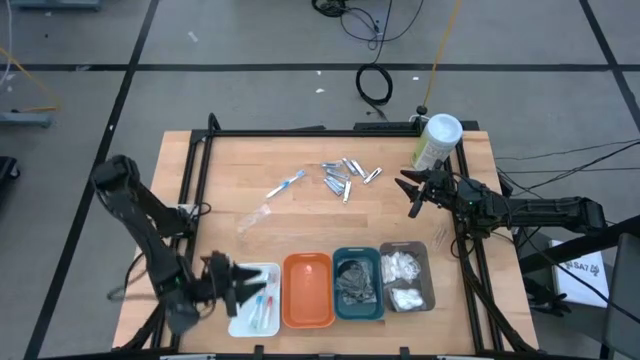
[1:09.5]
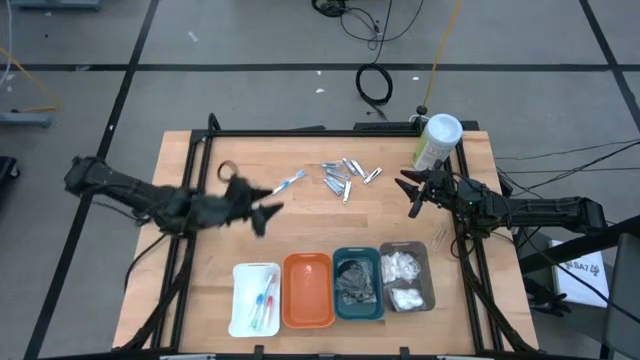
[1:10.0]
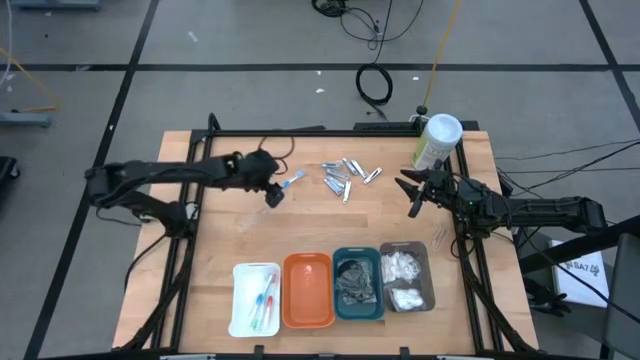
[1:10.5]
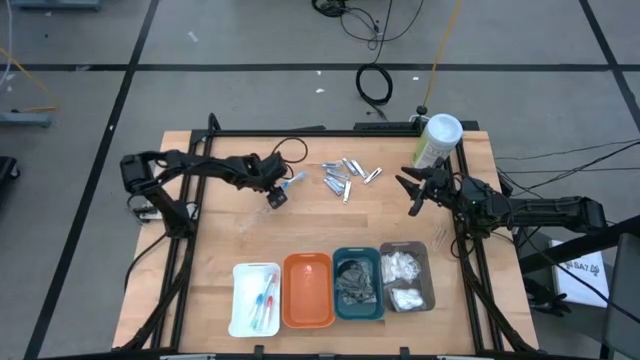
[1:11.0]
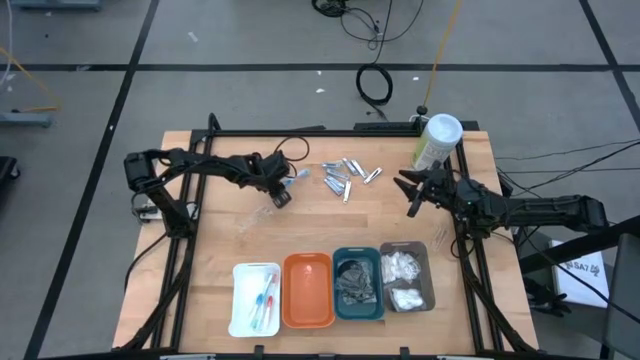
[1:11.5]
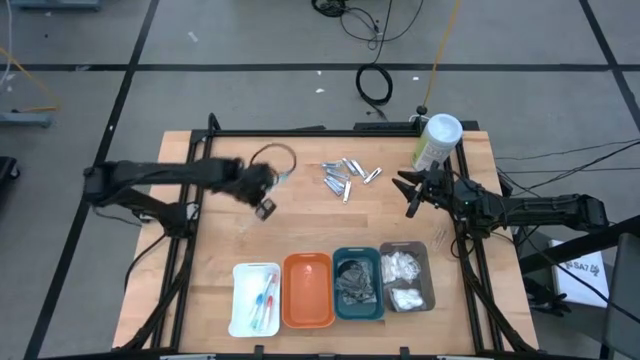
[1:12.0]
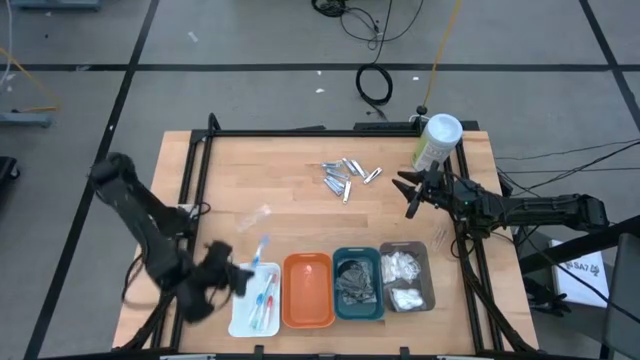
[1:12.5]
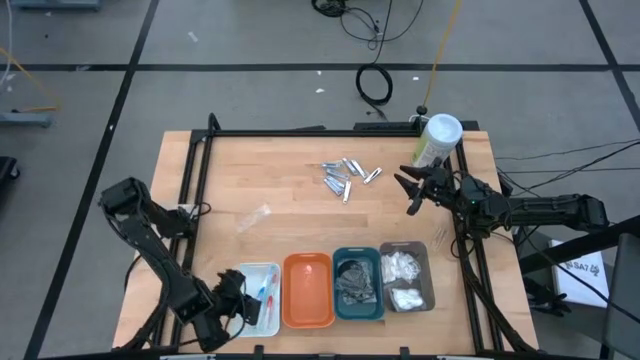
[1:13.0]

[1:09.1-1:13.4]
Task: Pick & Place Travel size toiletries
Put the blue toothbrush into the white bin

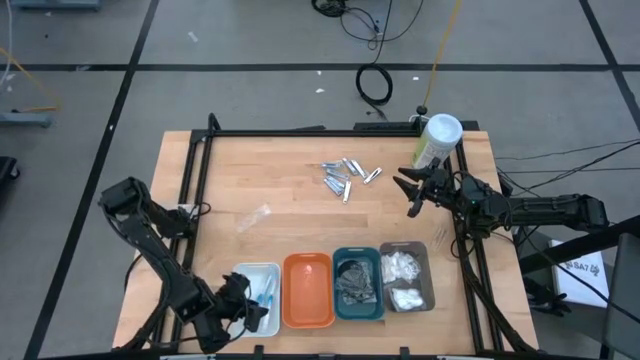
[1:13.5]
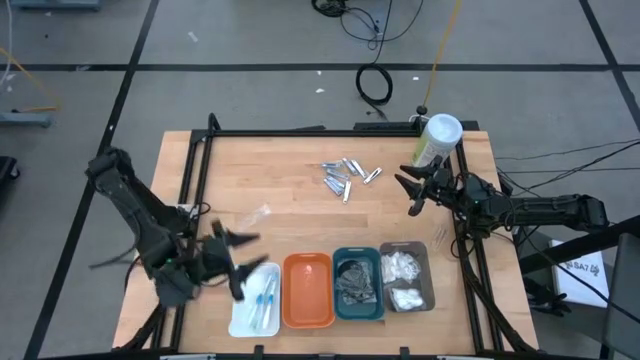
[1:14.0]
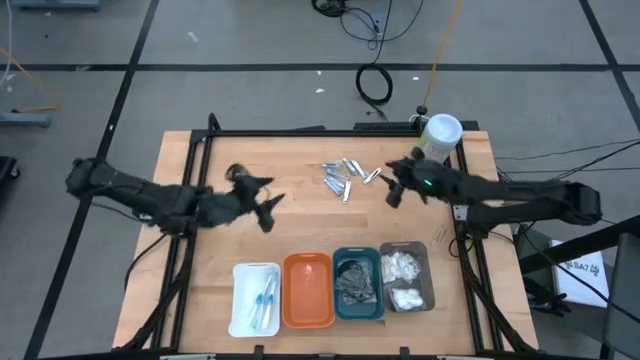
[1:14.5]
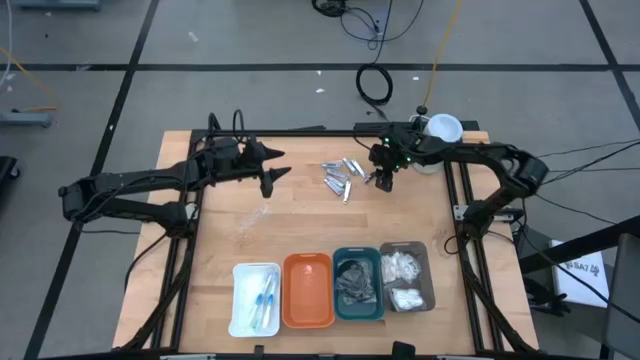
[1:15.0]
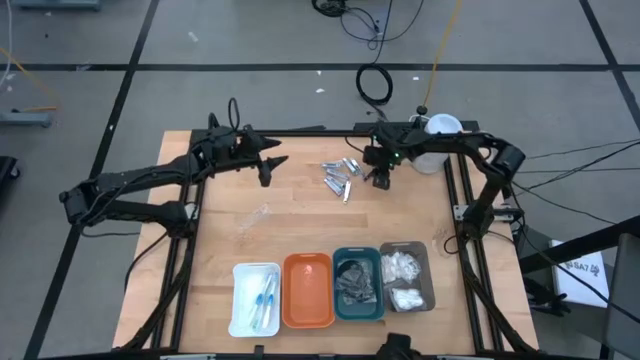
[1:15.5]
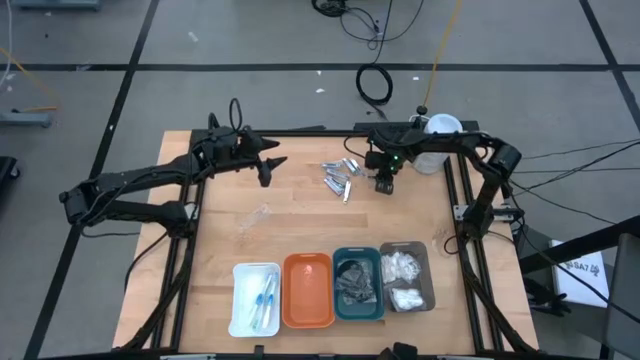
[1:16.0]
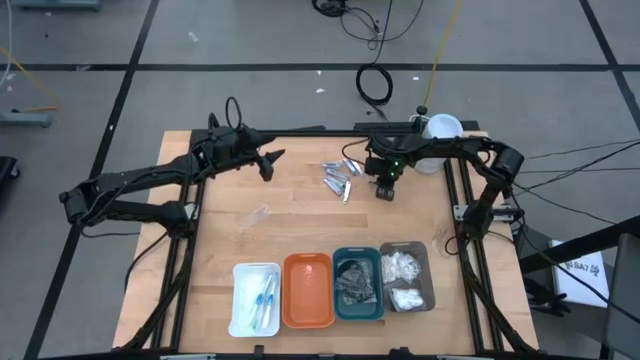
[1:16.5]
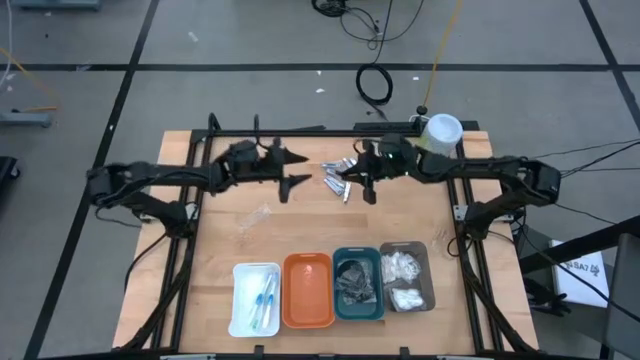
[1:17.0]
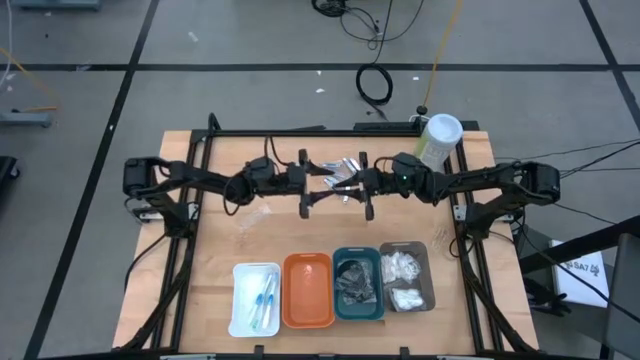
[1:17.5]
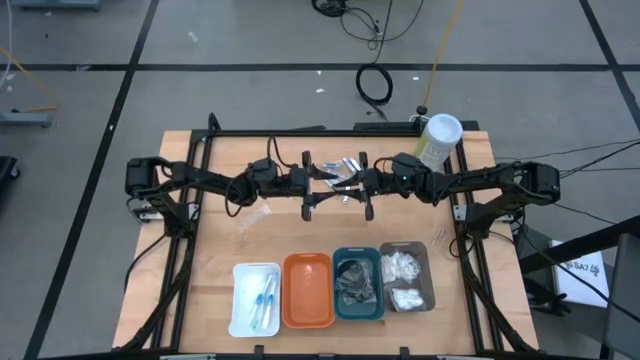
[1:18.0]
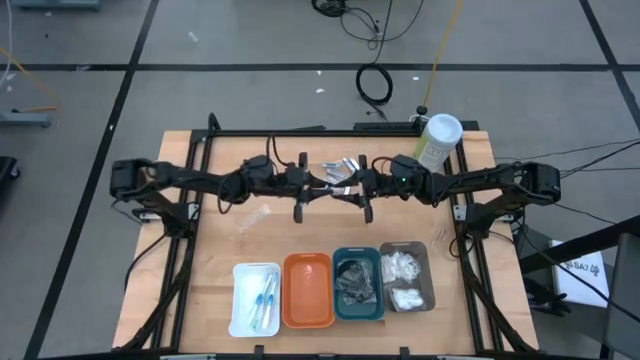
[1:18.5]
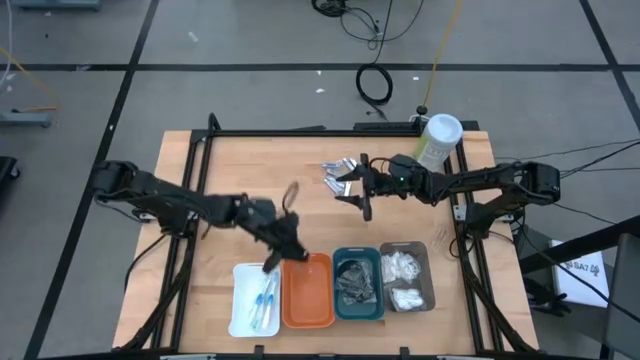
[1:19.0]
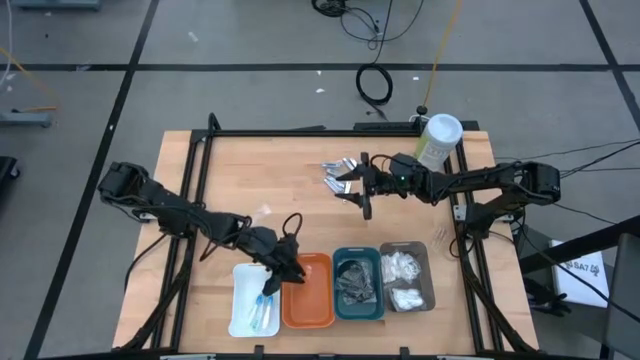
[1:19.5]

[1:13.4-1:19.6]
Put the silver nail cutter into the orange bin

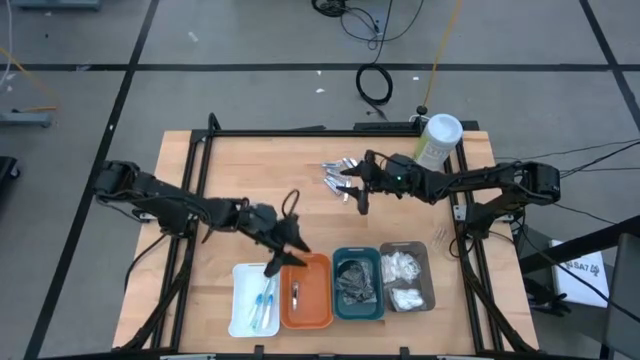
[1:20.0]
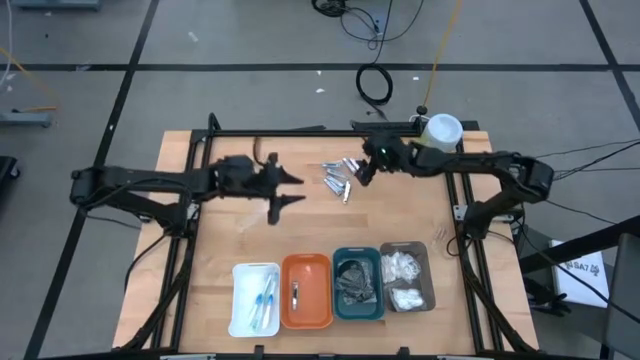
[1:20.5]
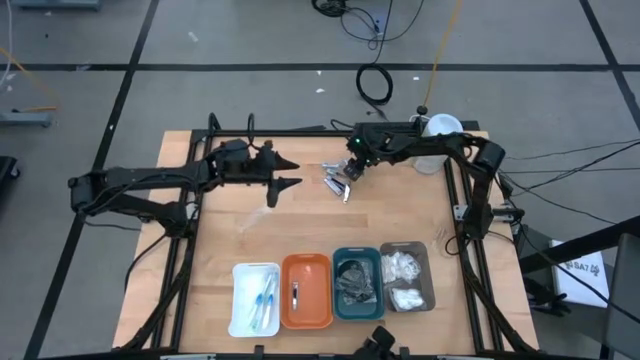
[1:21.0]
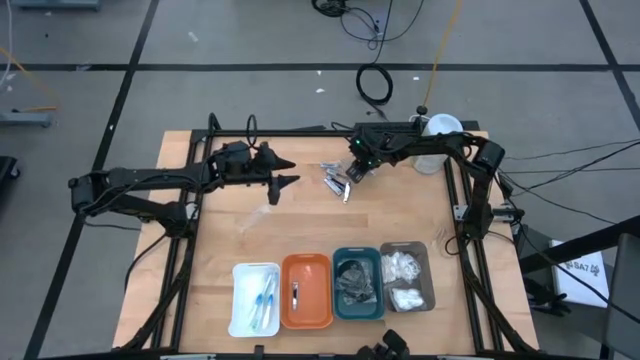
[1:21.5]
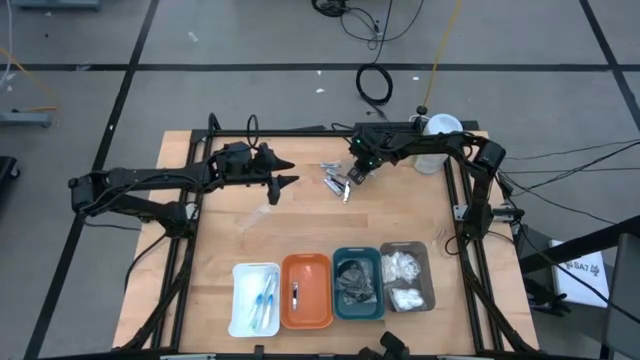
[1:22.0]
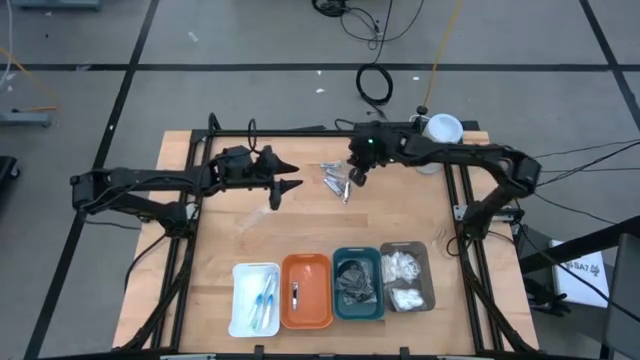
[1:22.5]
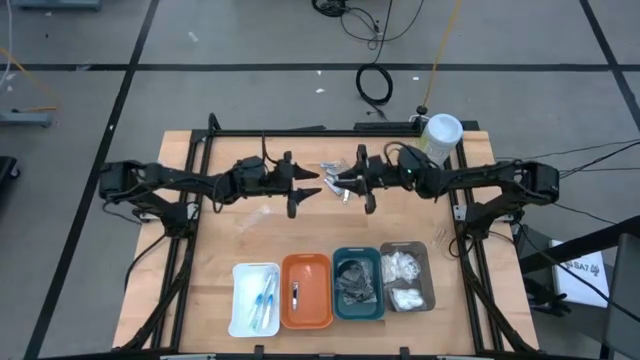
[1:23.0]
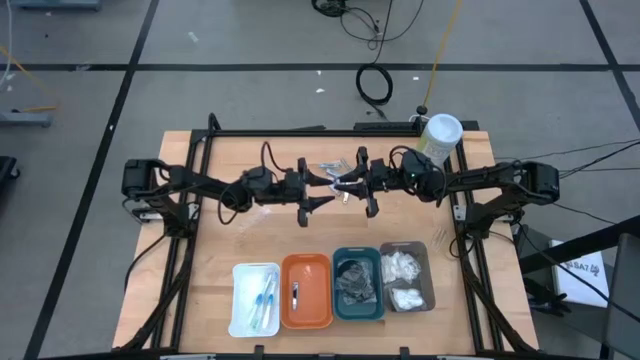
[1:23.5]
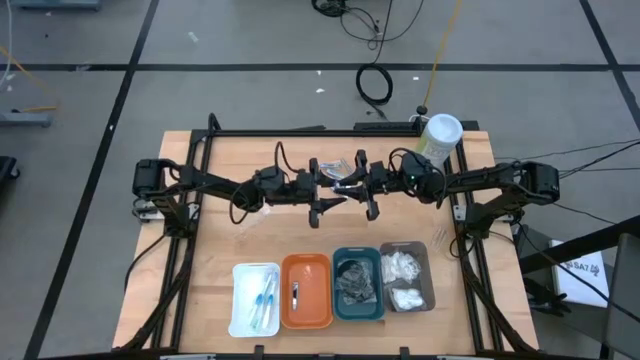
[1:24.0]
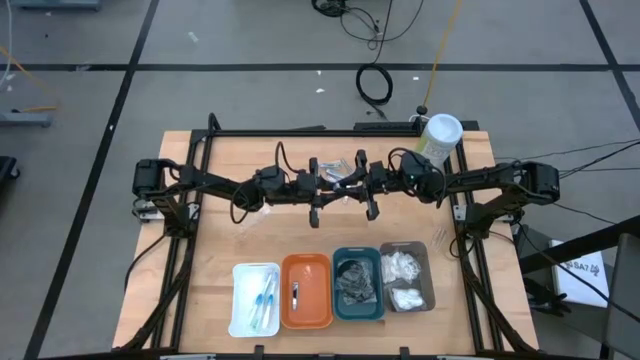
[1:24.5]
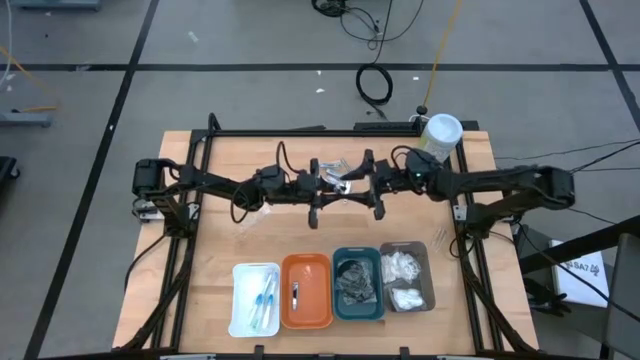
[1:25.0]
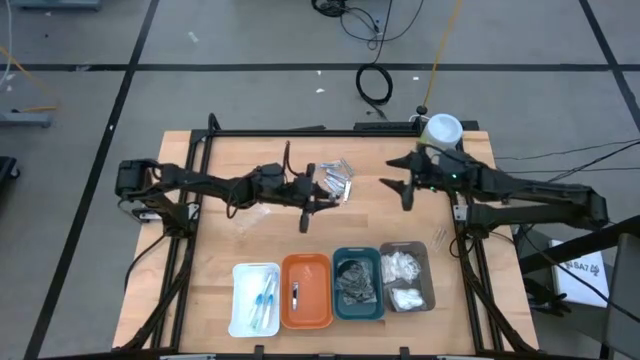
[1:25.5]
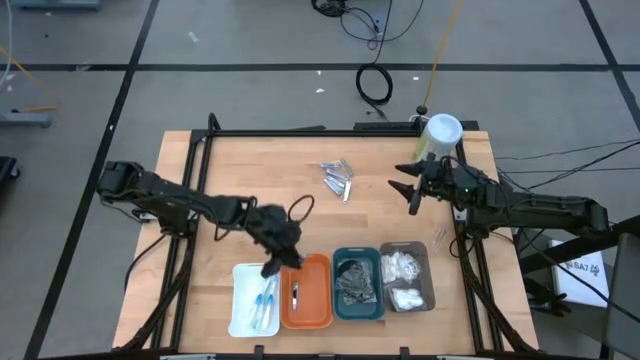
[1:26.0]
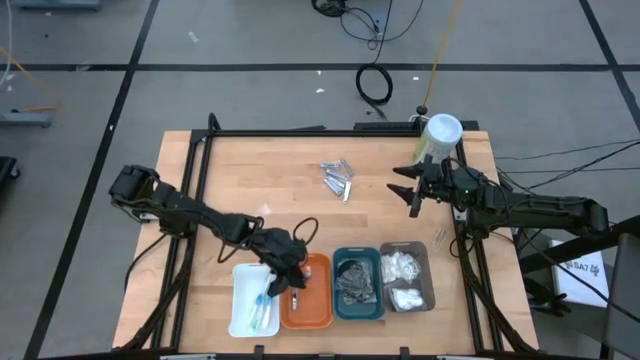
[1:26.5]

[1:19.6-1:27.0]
Put the silver nail cutter into the orange bin

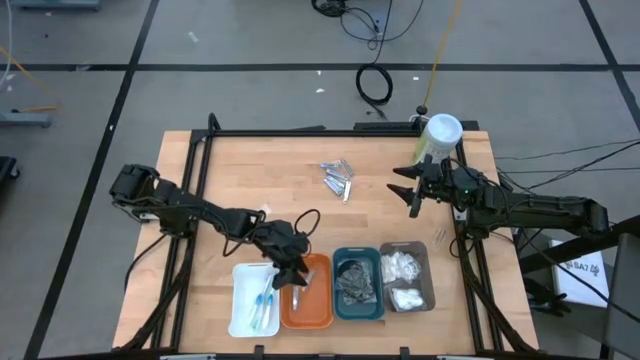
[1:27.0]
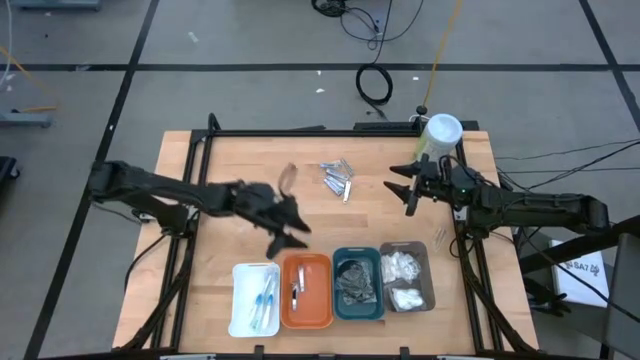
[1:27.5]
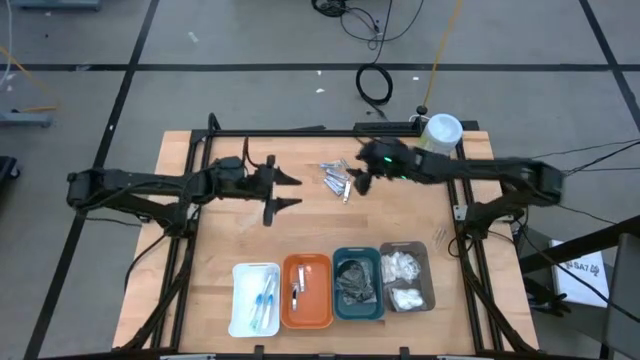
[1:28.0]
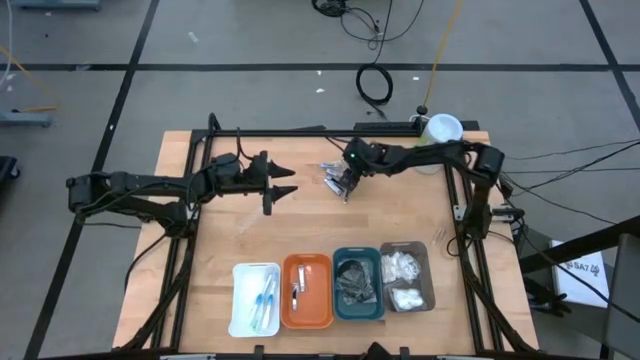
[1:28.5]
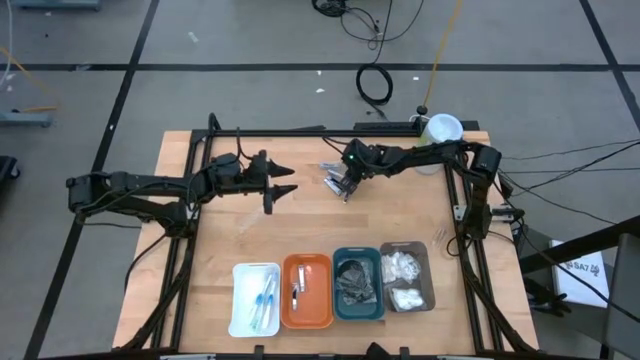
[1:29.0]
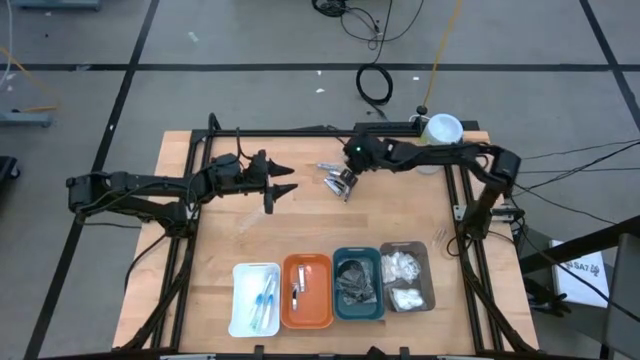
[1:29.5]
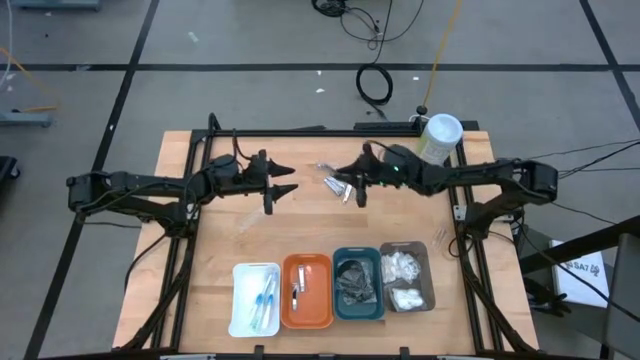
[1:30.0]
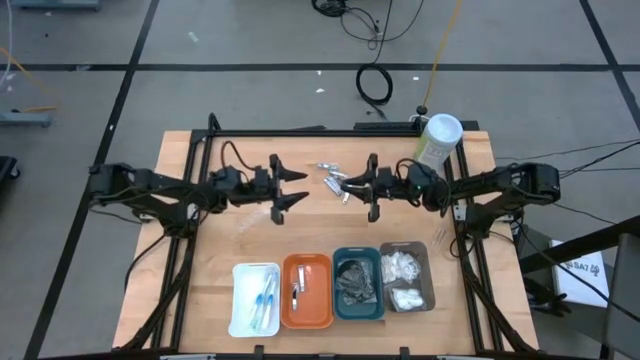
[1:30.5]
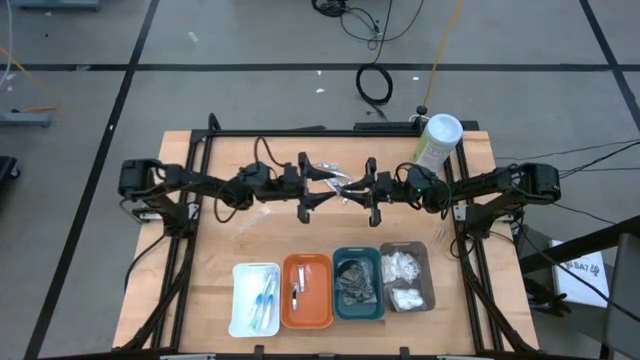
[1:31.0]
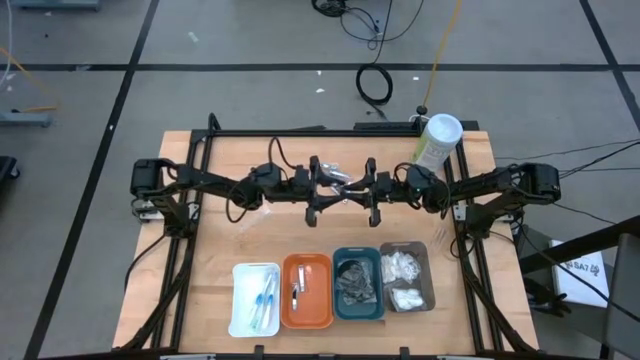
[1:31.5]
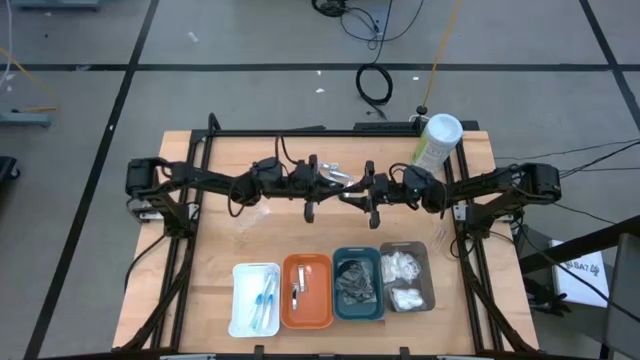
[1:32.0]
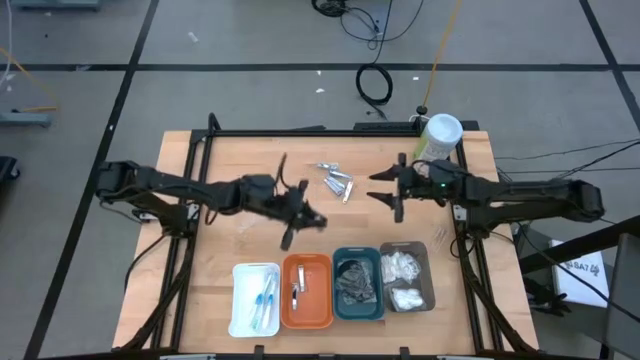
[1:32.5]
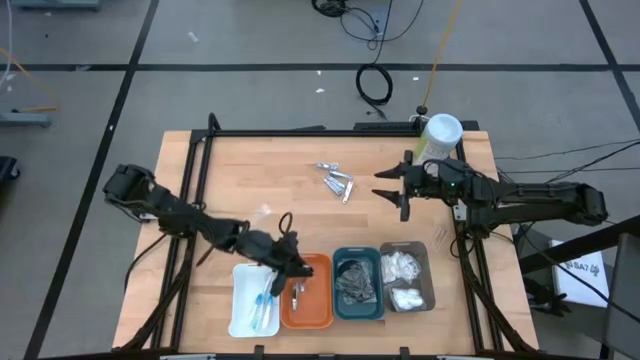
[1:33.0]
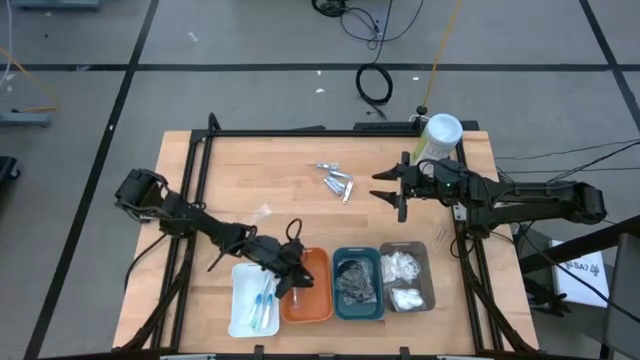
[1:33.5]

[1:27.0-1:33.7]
Put the silver nail cutter into the orange bin
